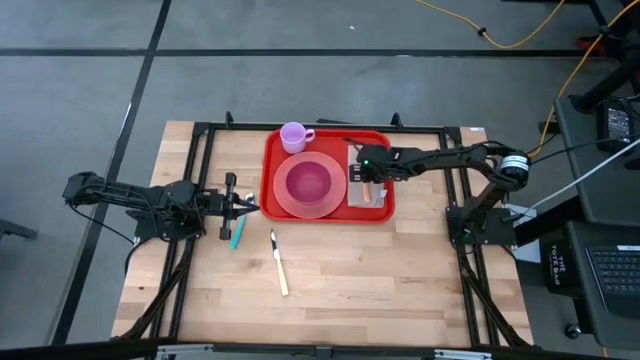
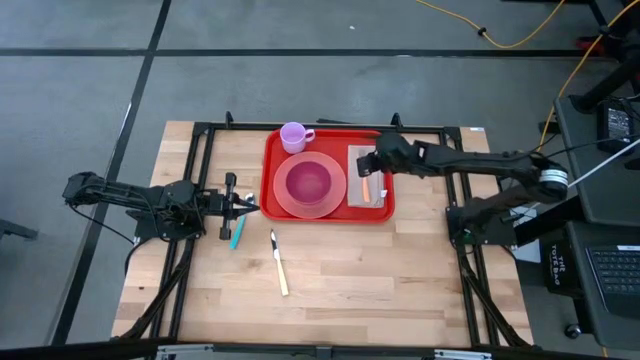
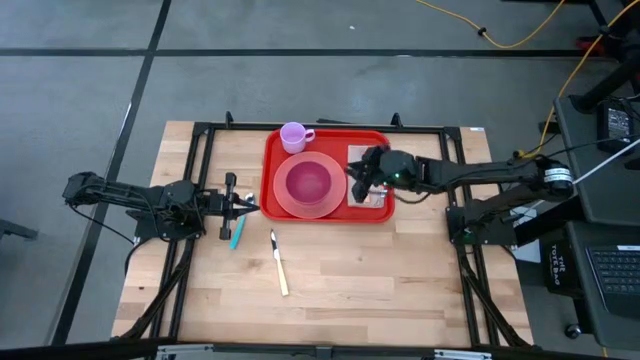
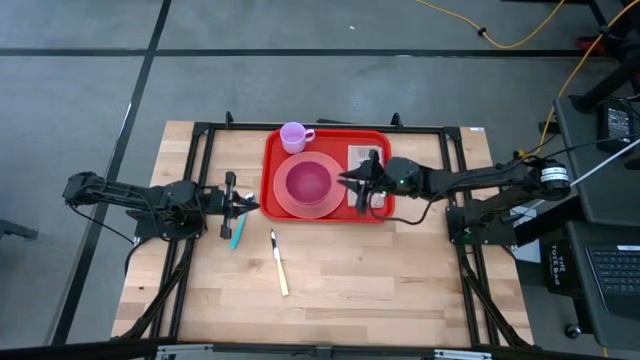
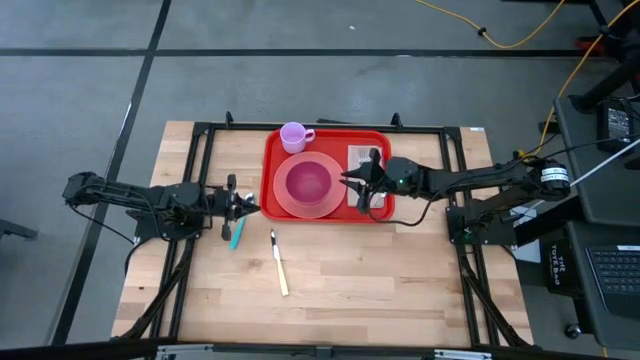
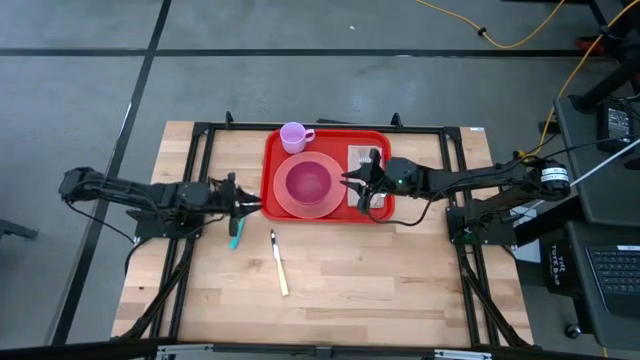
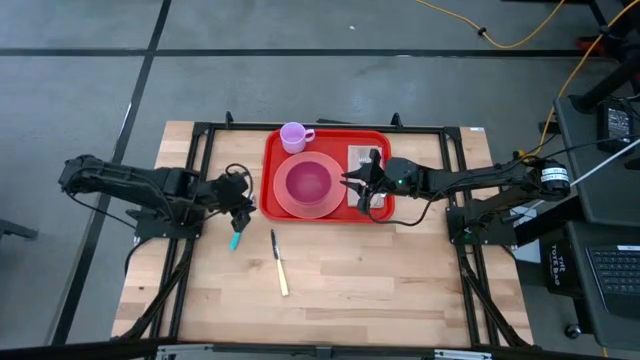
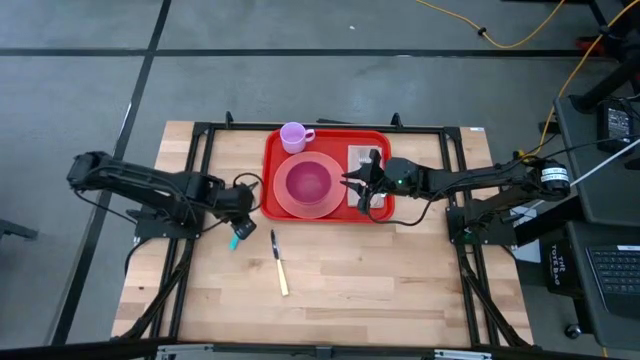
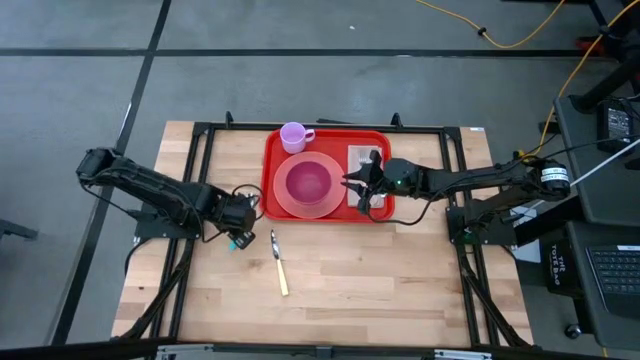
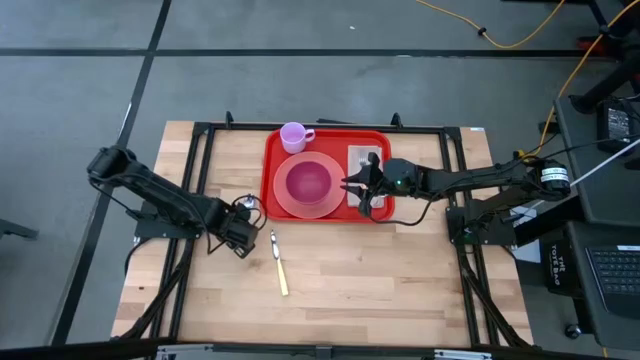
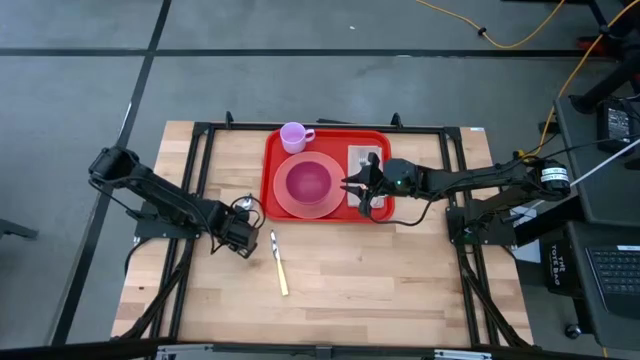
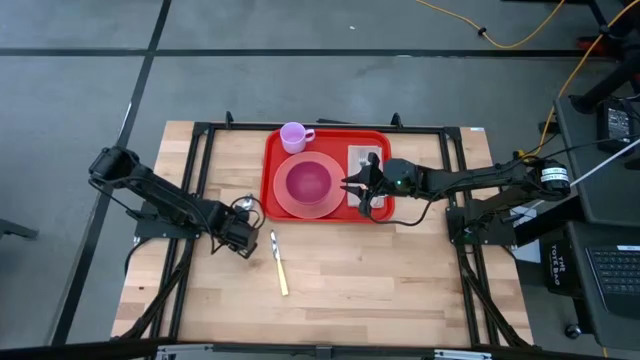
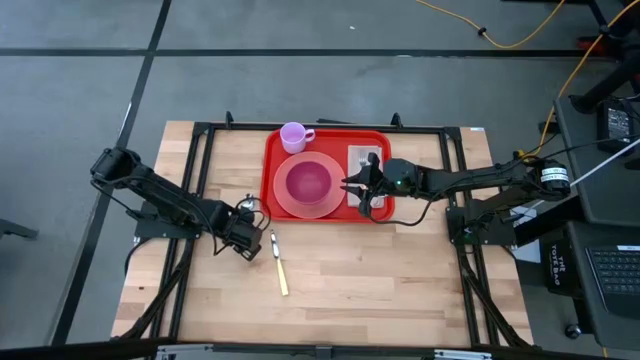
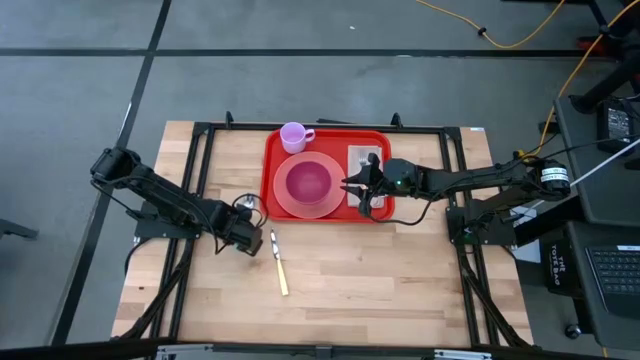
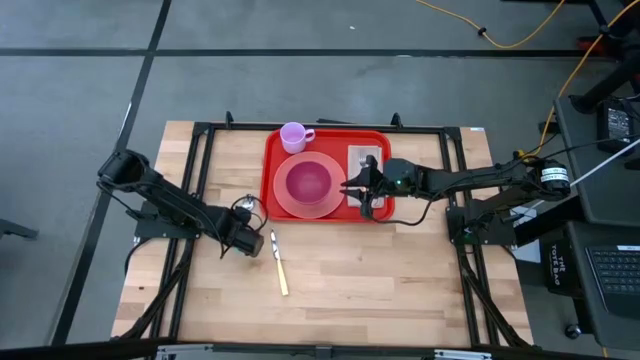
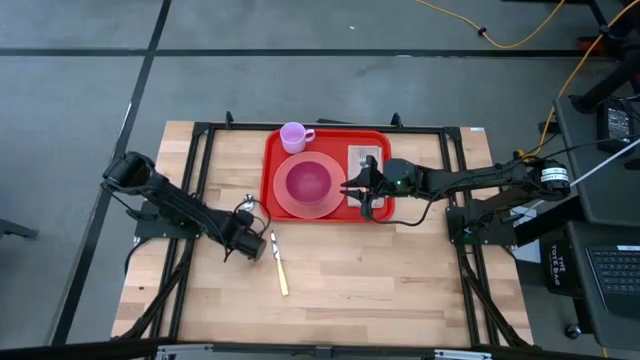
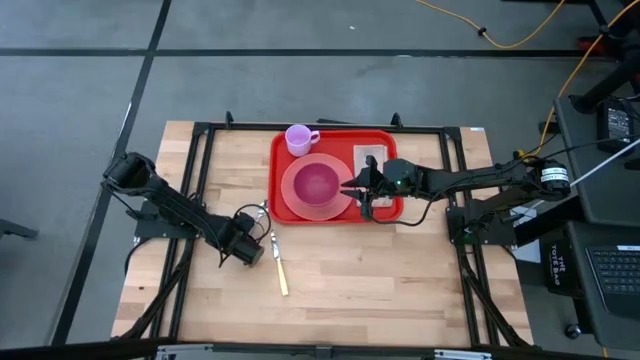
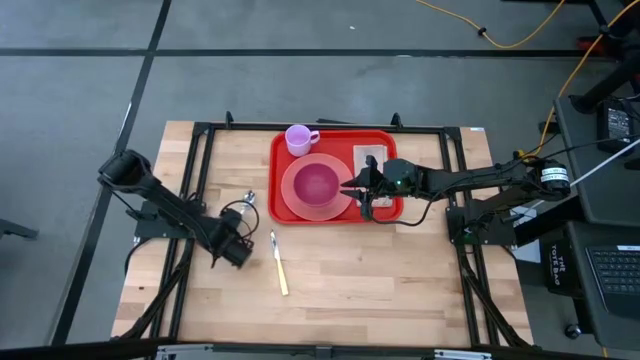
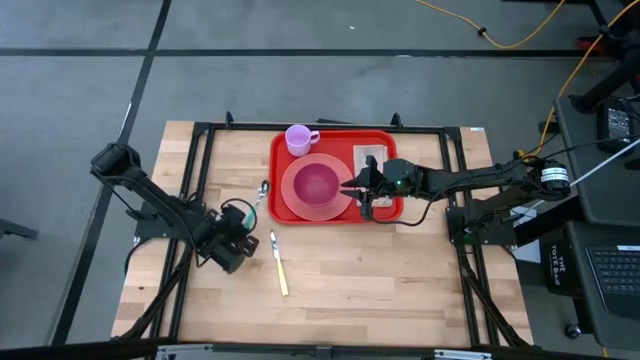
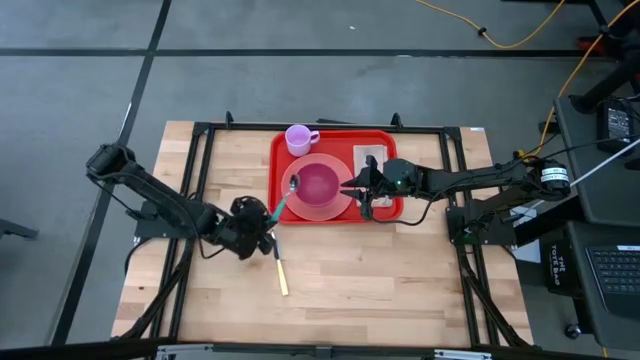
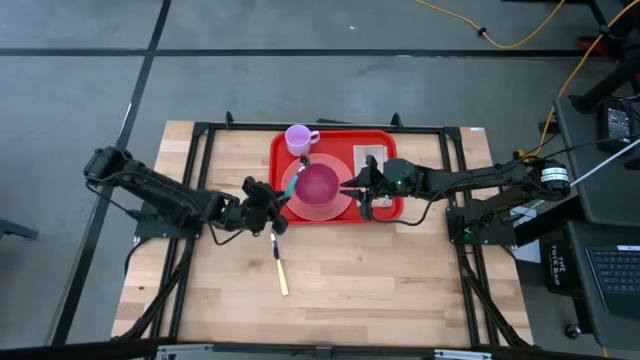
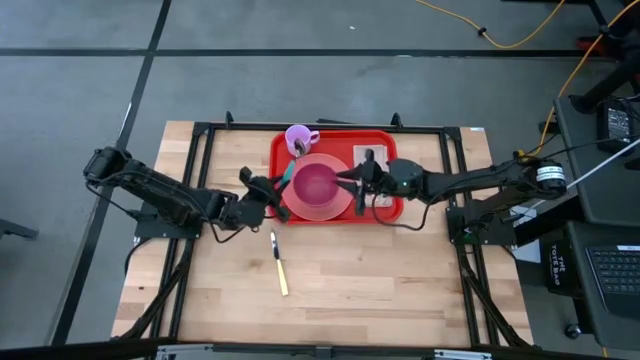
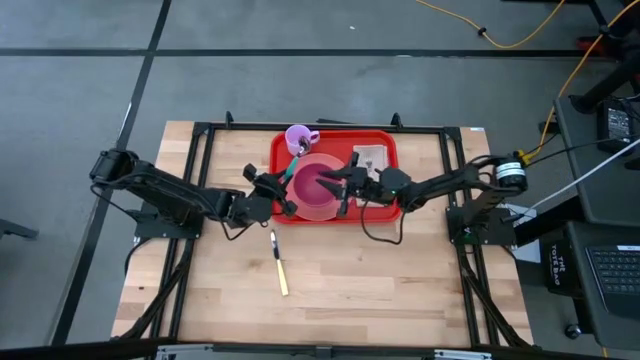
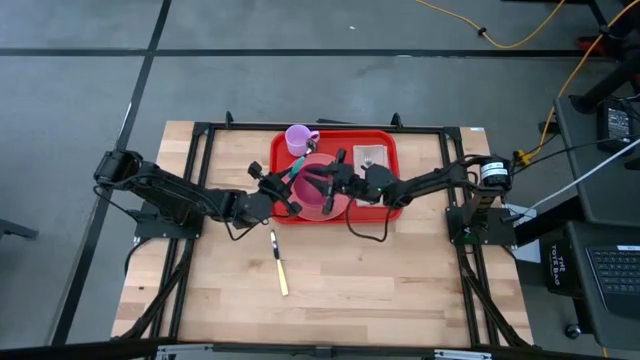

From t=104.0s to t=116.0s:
Task: Set up tray
Put the blue spoon on top of the brown napkin to the left of the orange fork

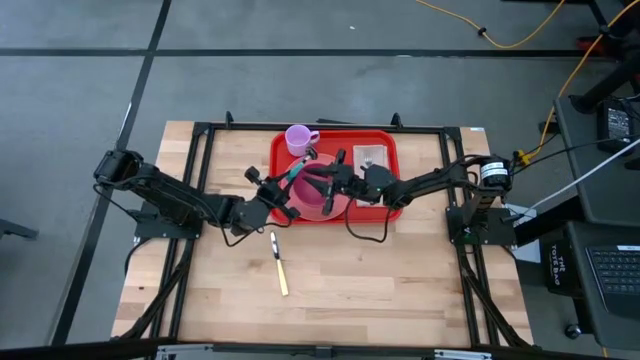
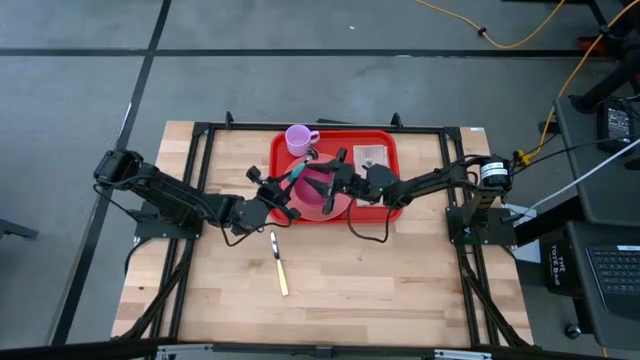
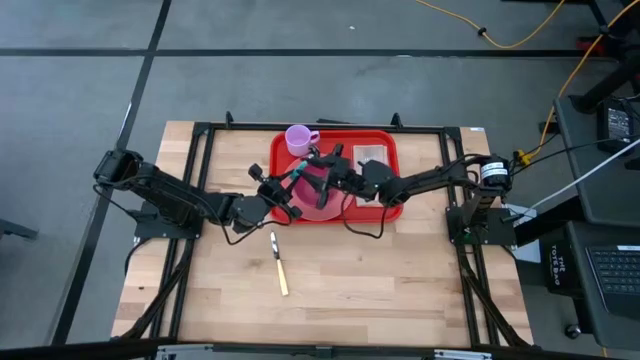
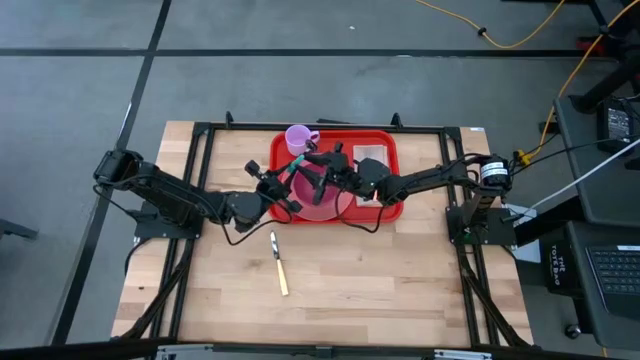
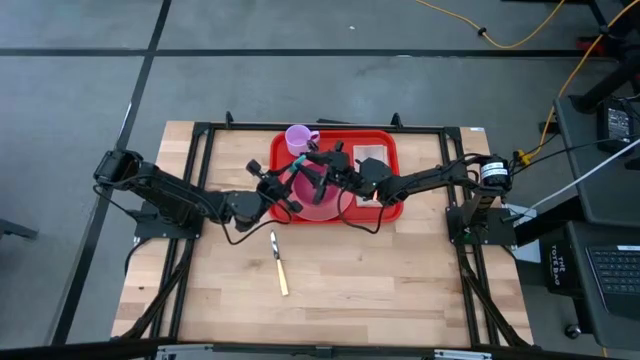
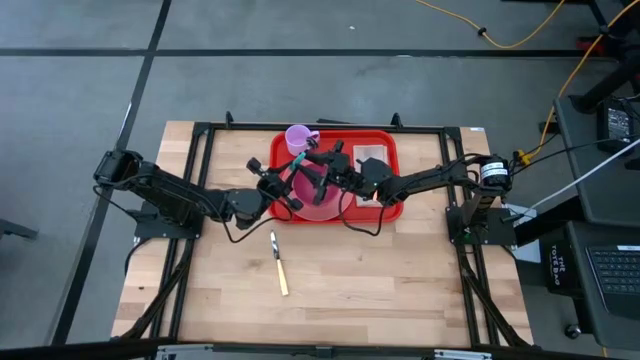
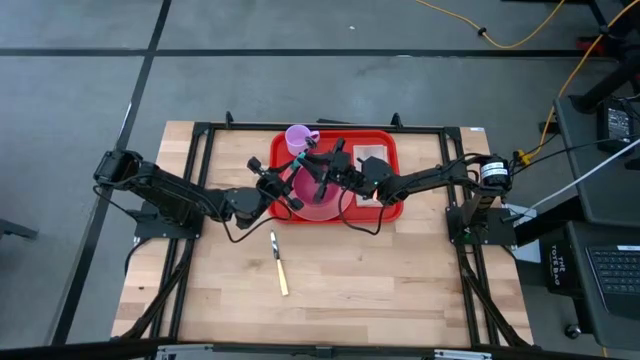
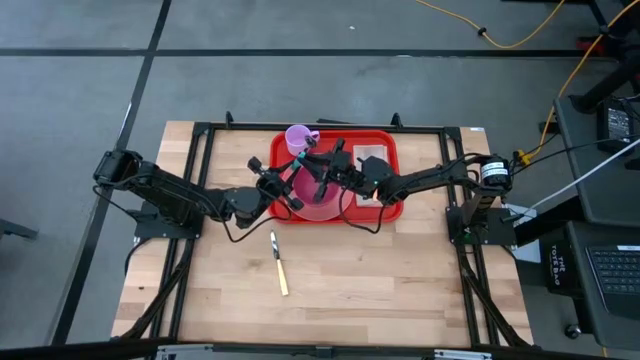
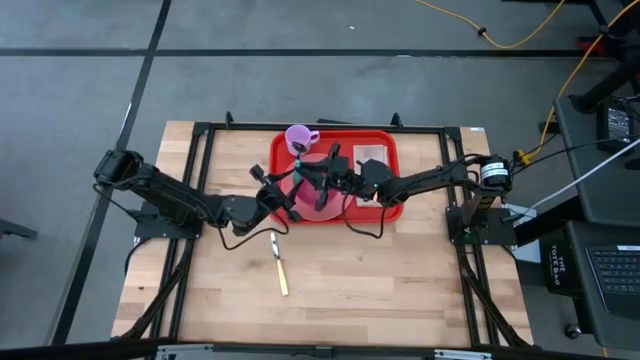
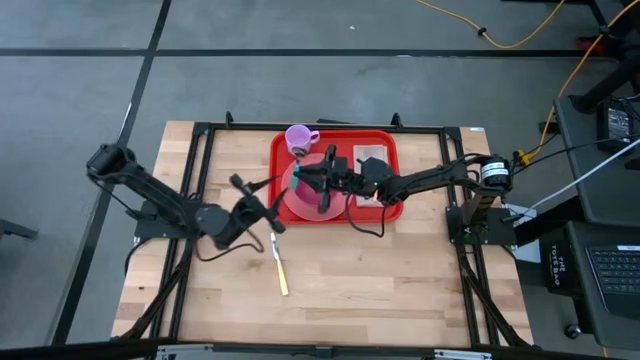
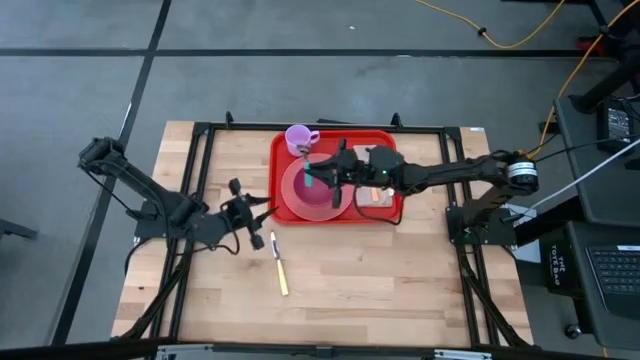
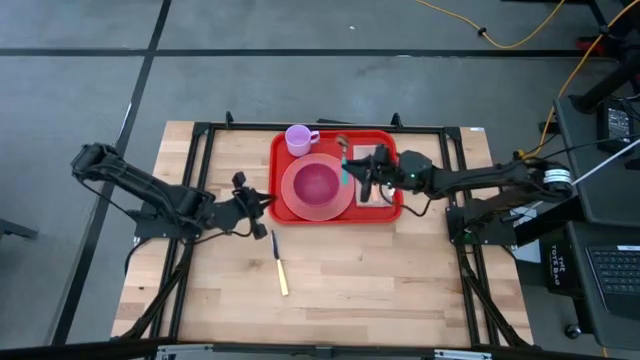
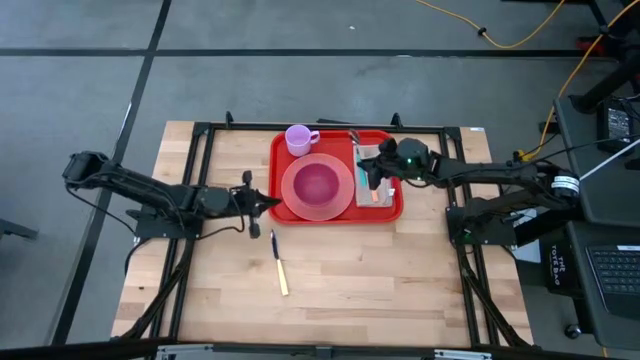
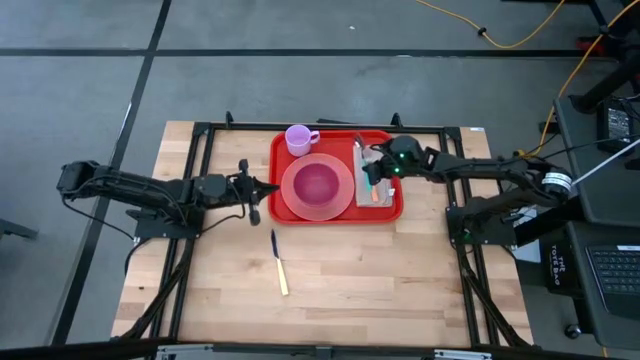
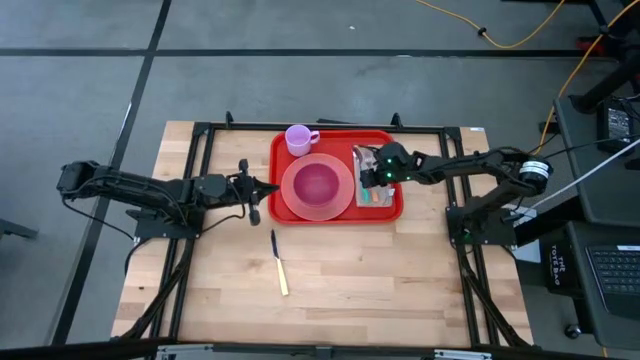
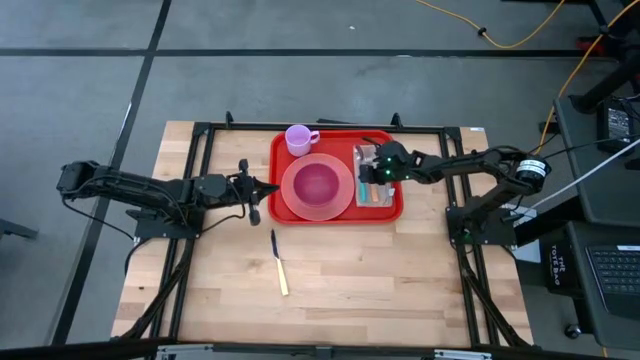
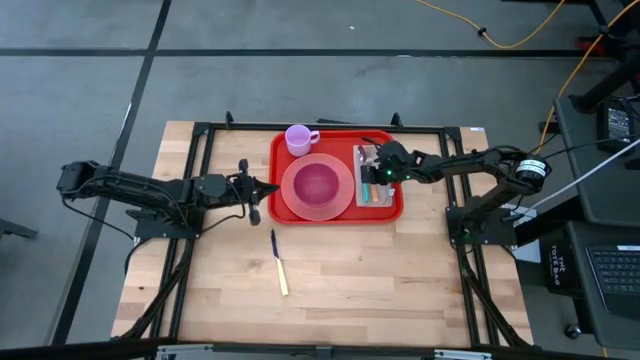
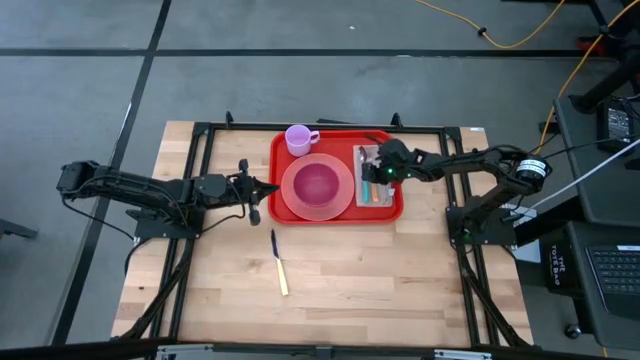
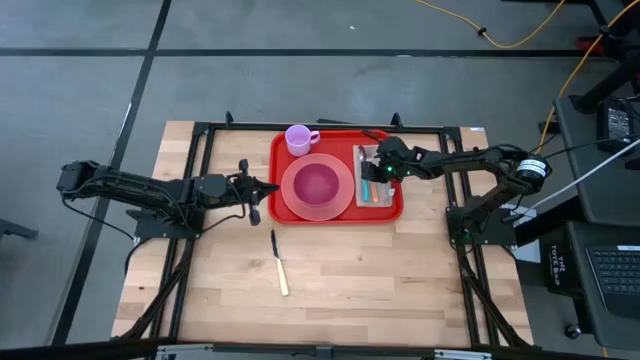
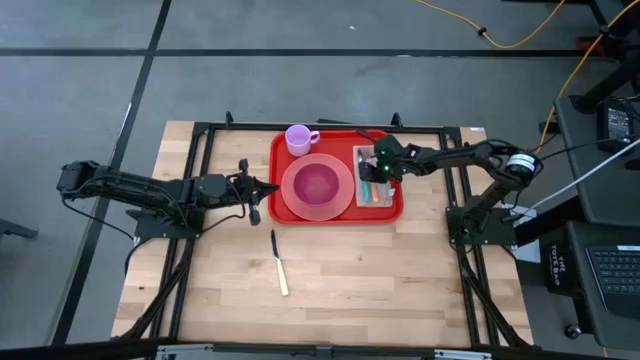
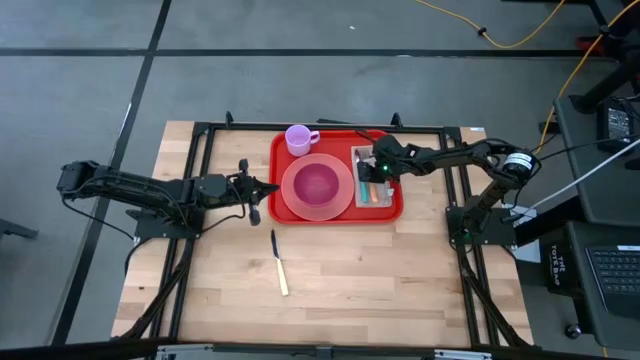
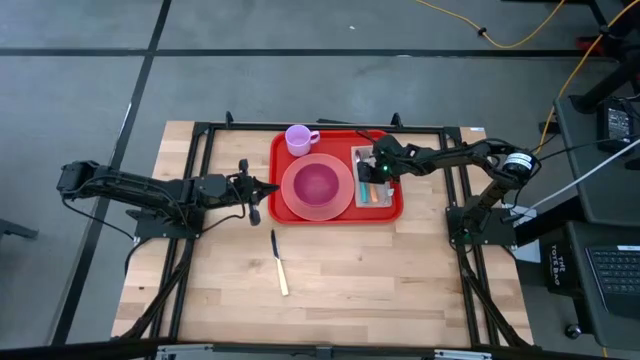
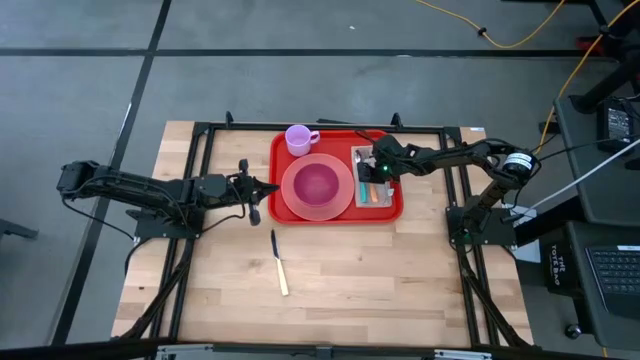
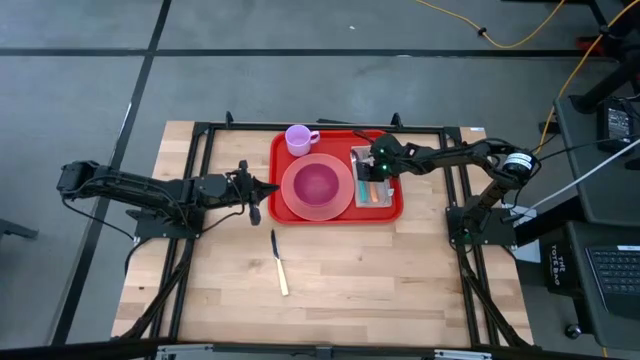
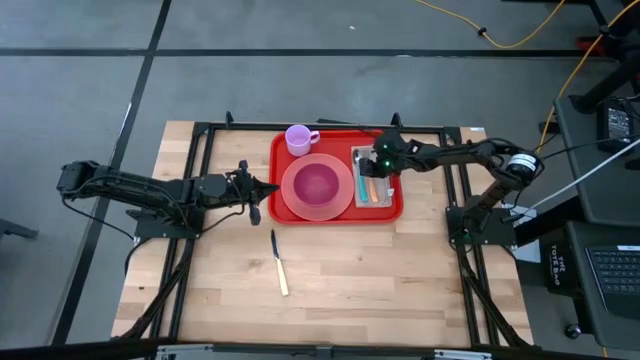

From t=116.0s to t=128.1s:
Put the blue spoon on top of the brown napkin to the left of the orange fork
